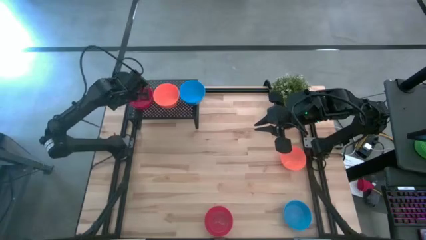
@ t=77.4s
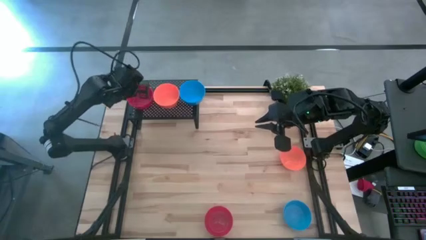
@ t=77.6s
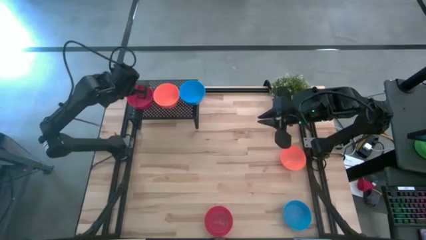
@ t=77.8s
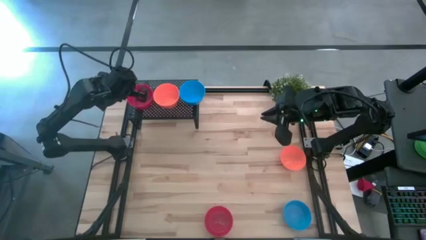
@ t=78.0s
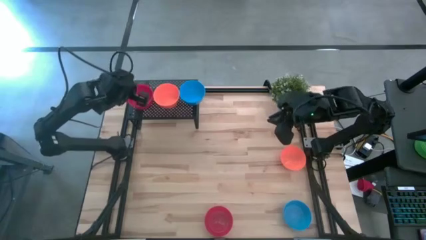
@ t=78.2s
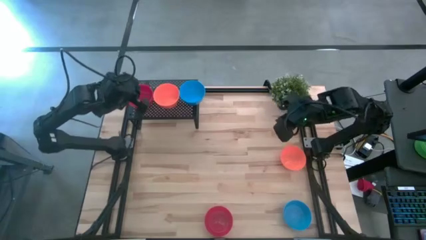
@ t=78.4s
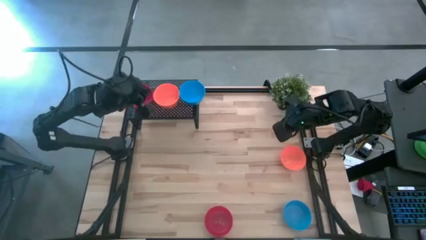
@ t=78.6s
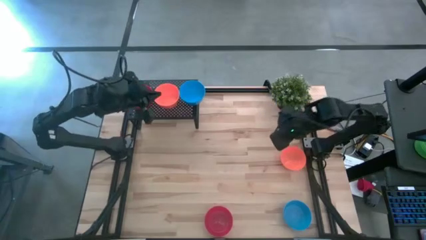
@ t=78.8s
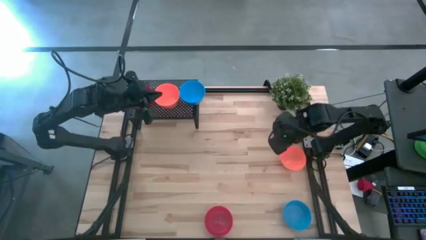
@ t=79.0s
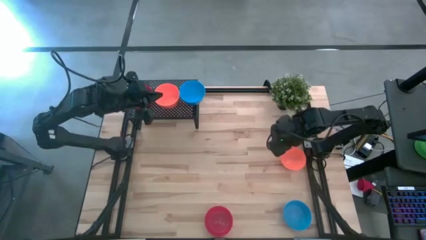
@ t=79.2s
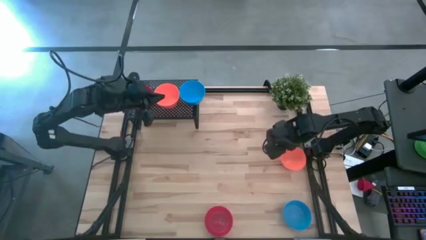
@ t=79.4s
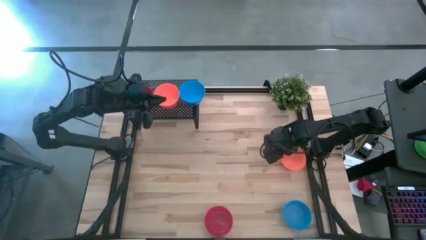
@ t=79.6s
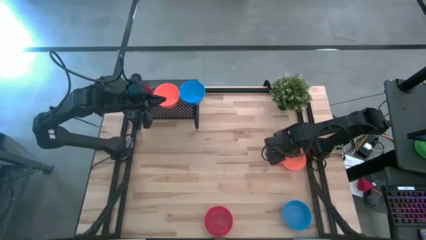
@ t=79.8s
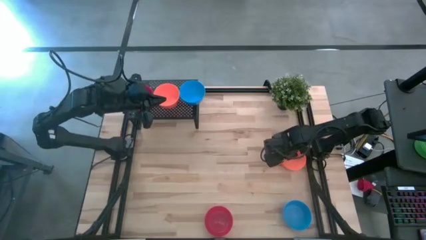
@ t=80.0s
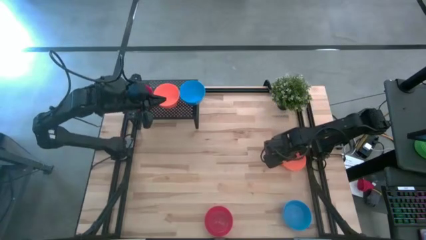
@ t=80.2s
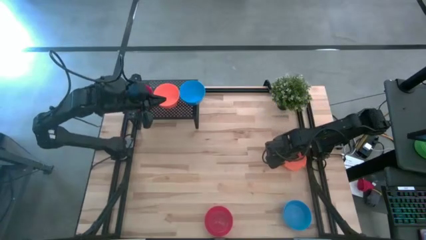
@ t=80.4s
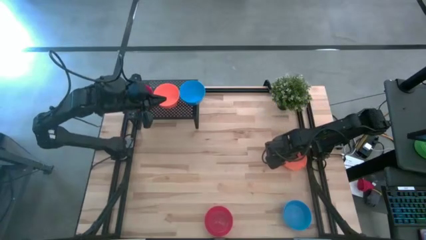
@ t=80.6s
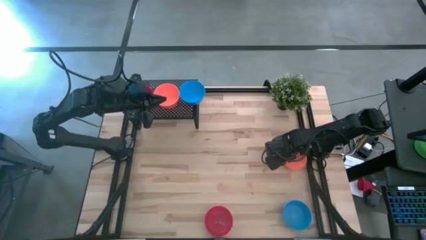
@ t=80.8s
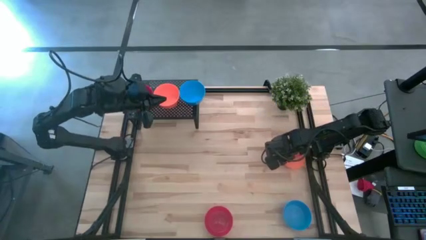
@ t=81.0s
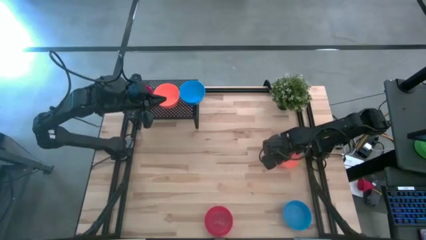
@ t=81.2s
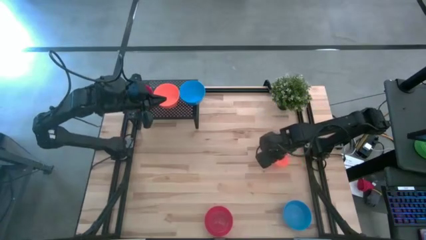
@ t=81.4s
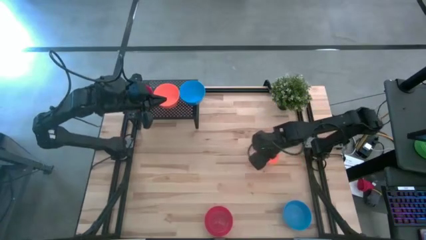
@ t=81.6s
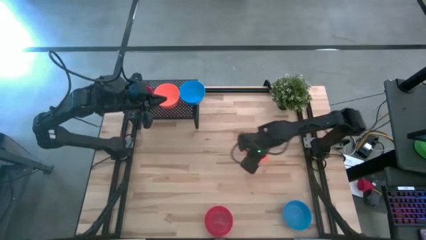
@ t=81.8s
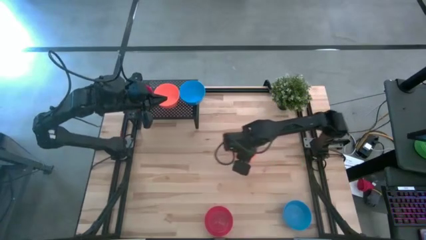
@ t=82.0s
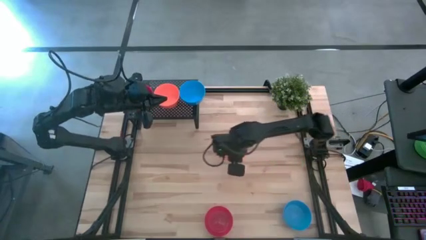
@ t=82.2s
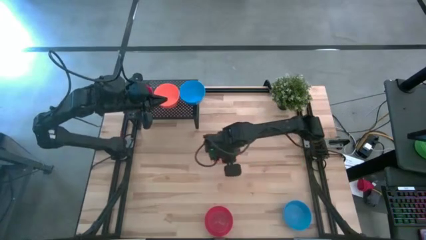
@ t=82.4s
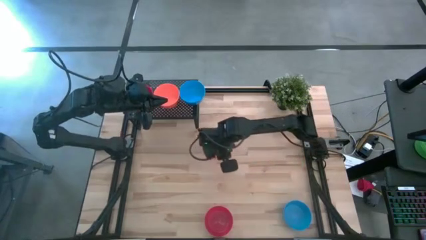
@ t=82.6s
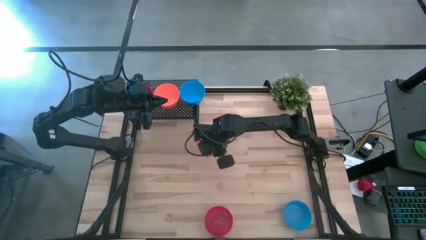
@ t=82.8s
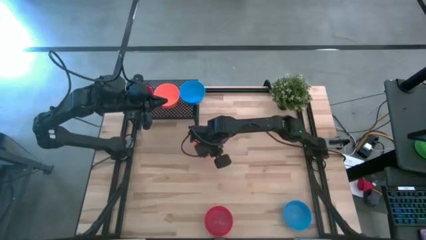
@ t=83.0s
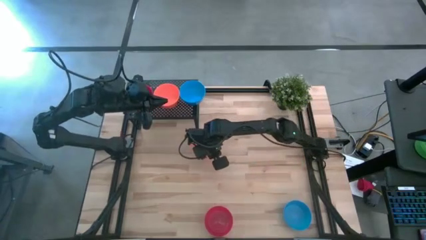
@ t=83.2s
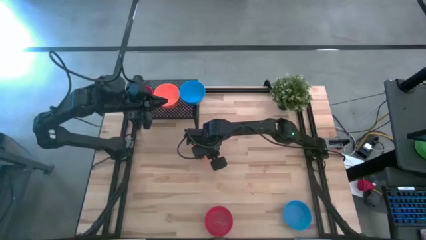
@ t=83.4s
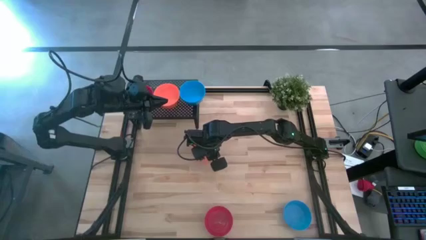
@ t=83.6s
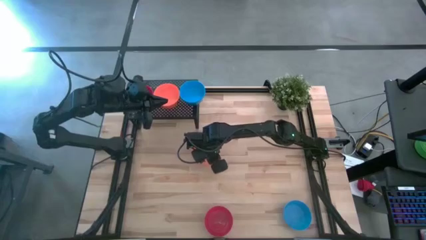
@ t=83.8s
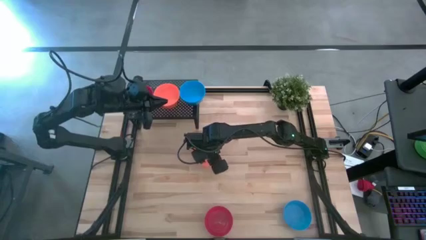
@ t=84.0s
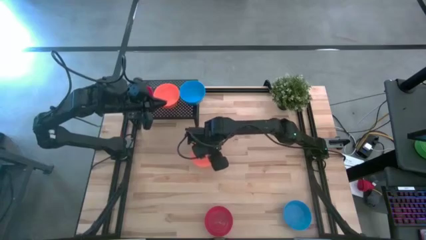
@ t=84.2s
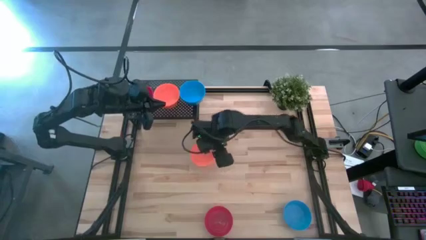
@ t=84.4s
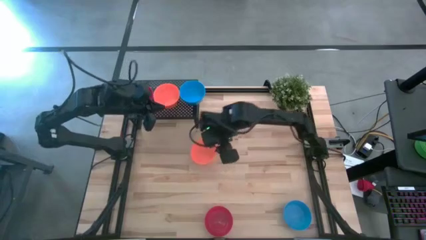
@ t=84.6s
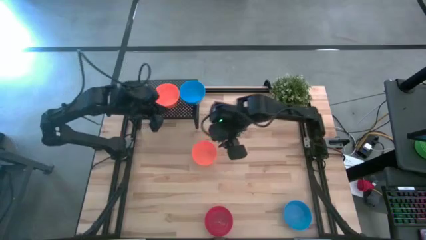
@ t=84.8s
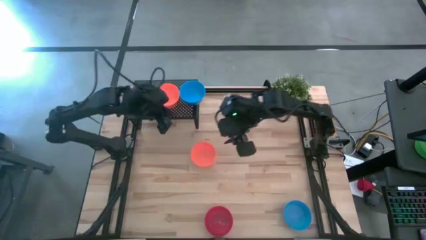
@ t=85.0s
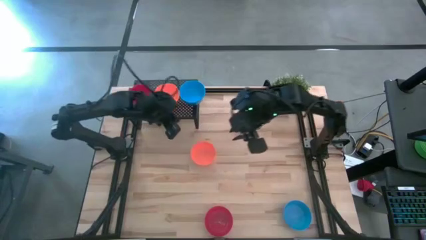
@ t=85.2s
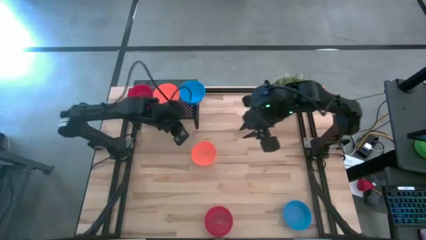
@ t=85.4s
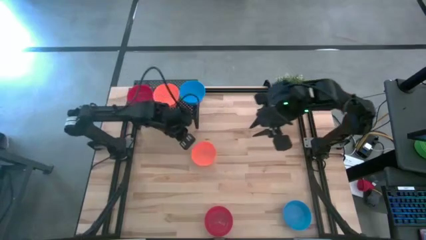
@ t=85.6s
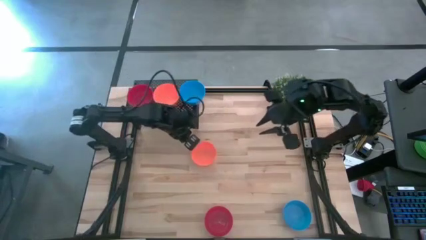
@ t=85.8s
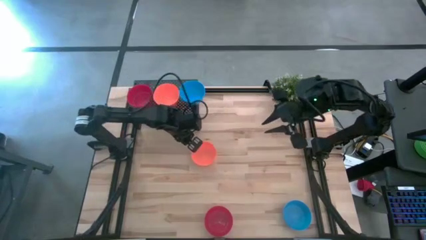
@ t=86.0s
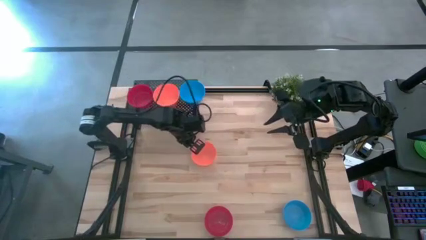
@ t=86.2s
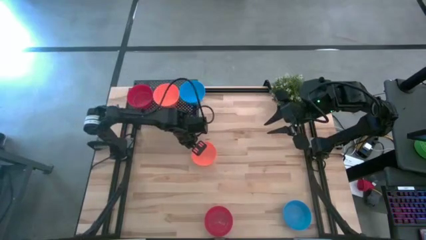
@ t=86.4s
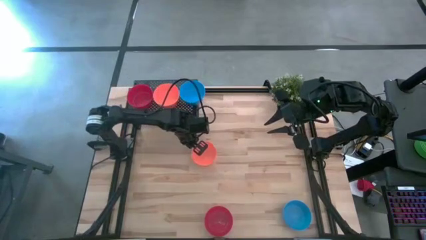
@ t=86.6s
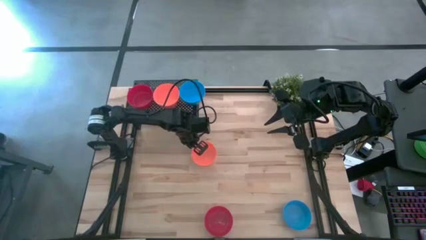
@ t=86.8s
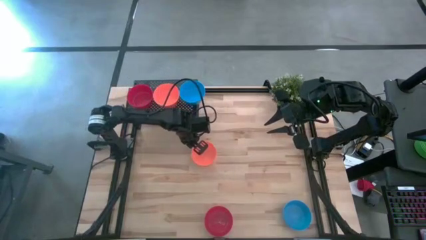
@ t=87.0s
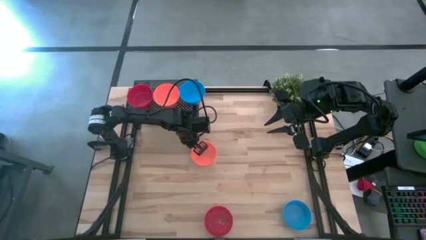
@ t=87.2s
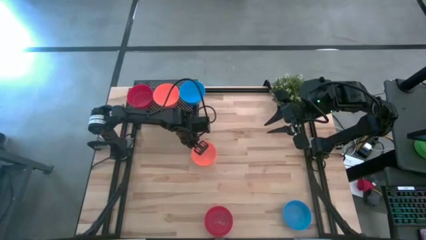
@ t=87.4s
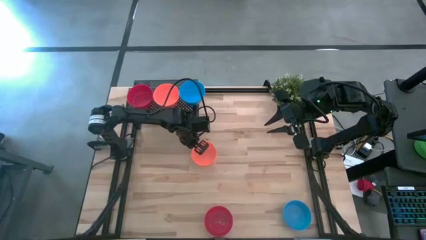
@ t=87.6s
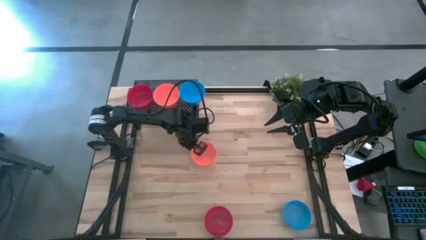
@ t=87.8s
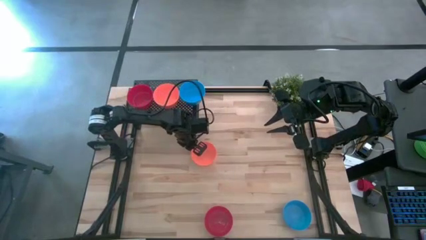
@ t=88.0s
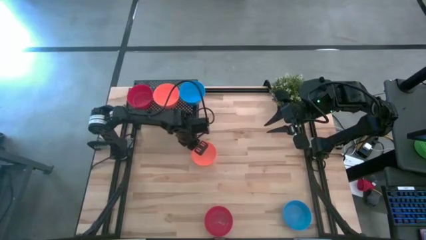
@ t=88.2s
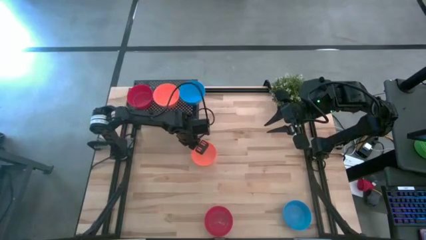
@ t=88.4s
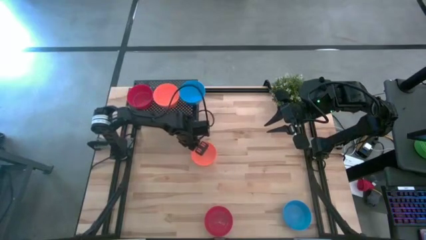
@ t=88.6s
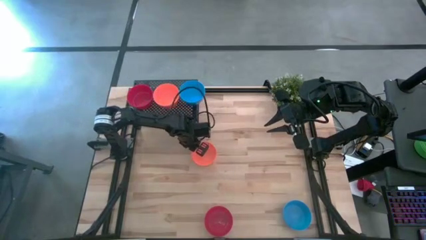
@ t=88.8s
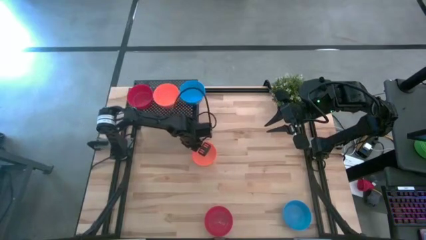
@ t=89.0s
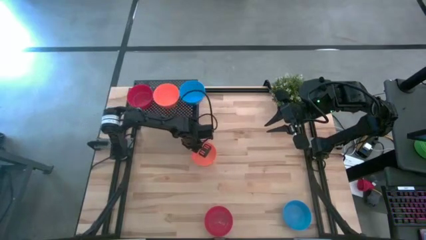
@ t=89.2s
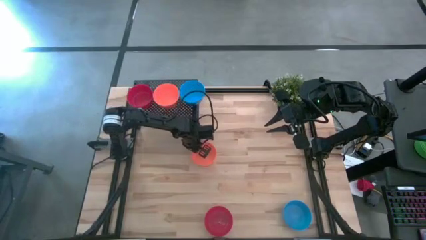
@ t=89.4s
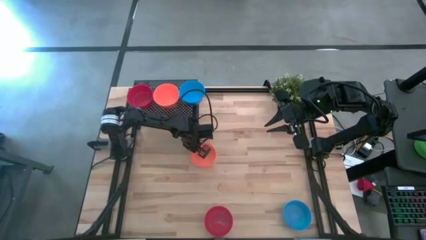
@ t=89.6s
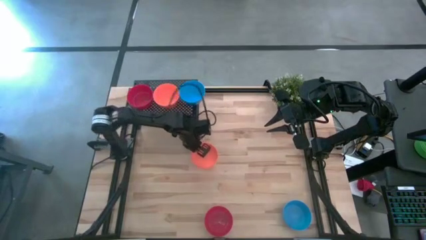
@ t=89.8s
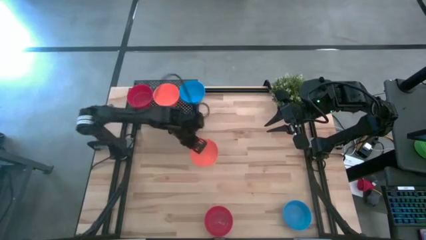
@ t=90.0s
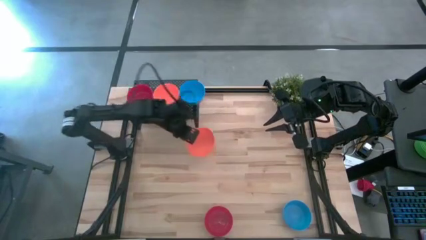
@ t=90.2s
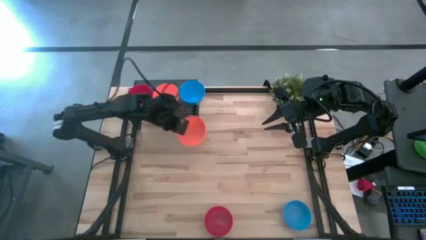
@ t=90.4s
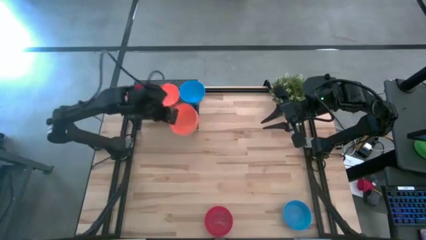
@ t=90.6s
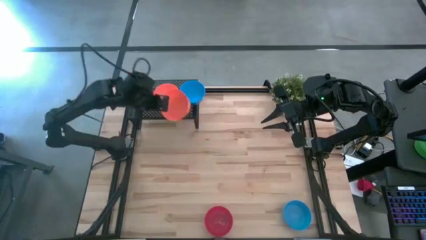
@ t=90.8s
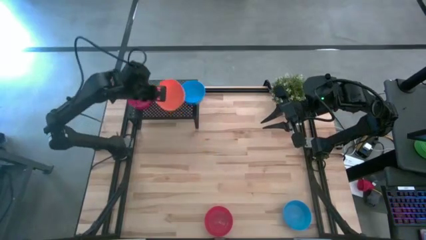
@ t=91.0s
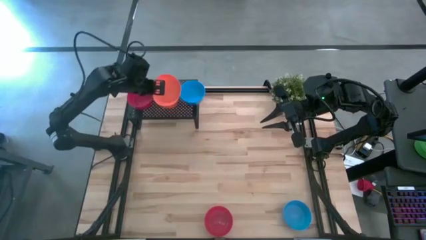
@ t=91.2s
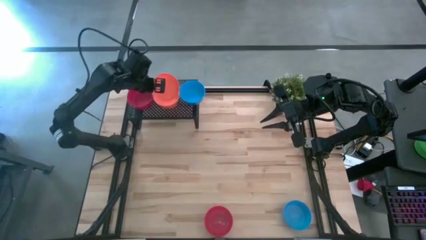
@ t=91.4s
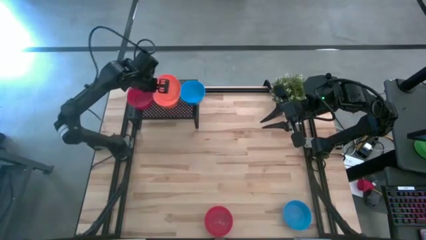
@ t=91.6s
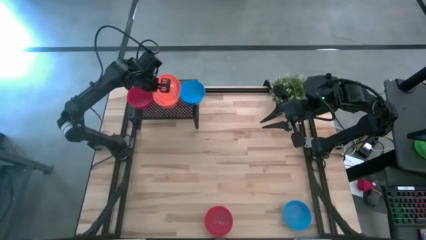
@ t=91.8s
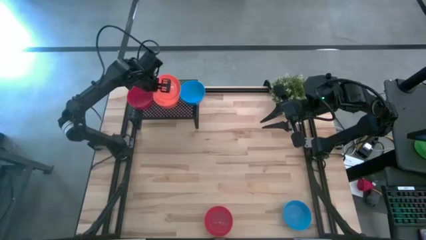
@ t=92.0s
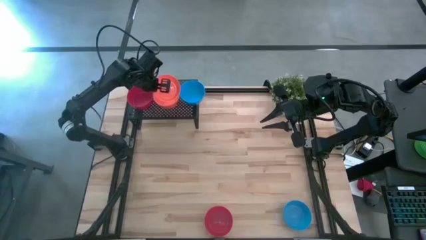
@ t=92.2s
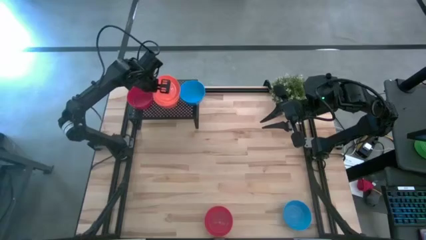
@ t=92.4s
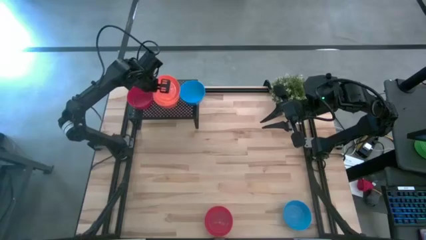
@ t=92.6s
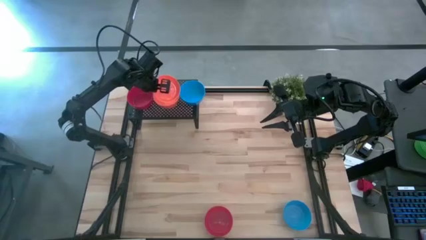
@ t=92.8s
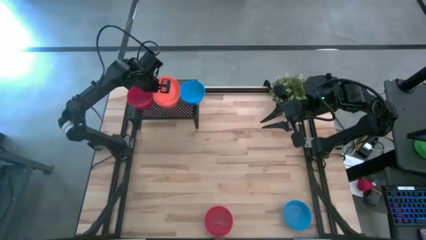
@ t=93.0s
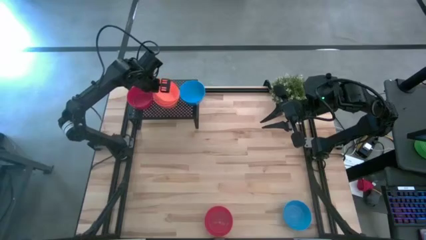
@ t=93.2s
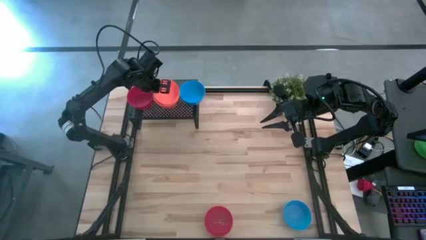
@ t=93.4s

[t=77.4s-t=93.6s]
Task: Pick & Place Mini bowls
Stack the orange bowl on top of the orange bowls on the shelf
